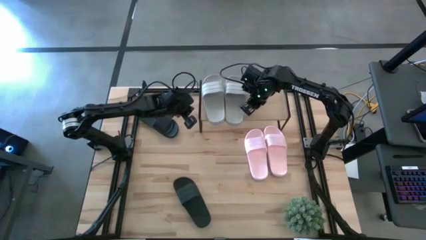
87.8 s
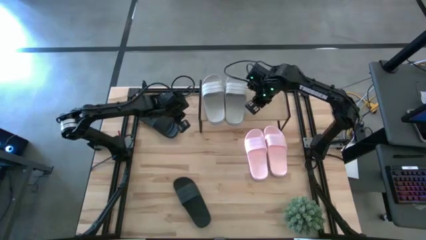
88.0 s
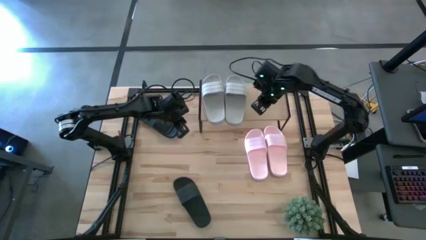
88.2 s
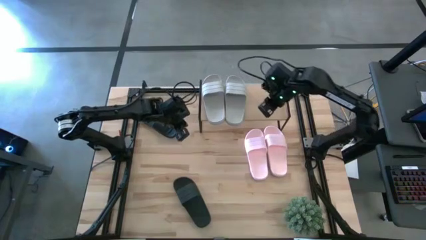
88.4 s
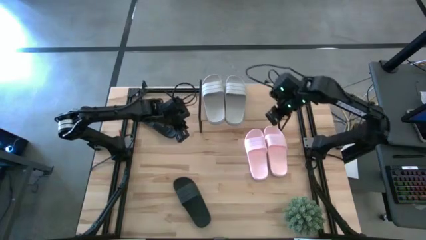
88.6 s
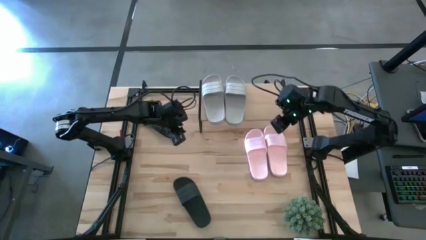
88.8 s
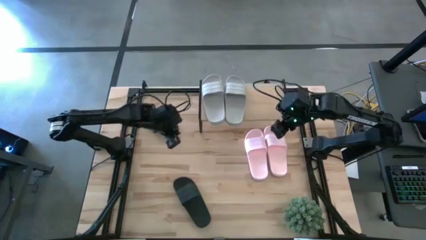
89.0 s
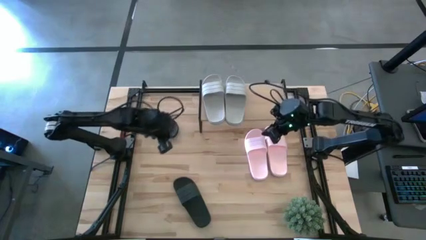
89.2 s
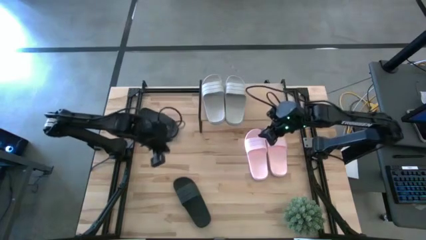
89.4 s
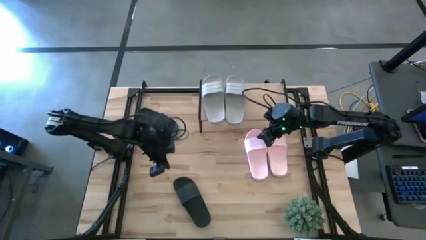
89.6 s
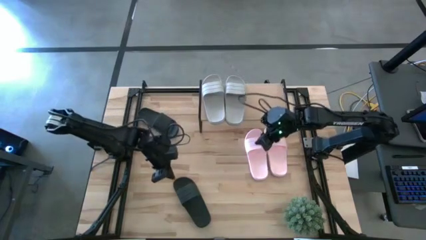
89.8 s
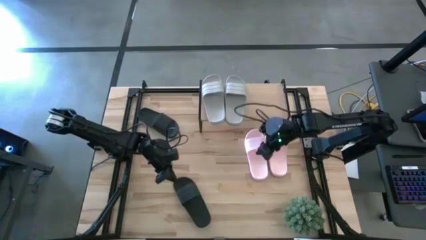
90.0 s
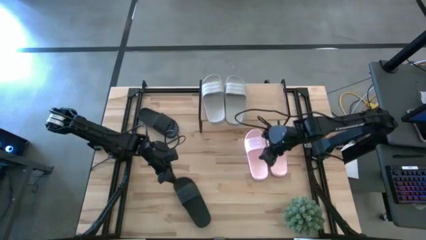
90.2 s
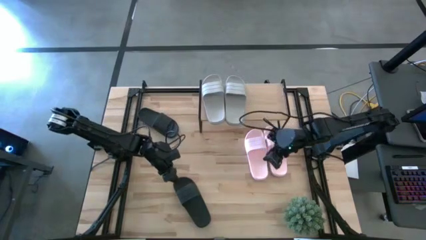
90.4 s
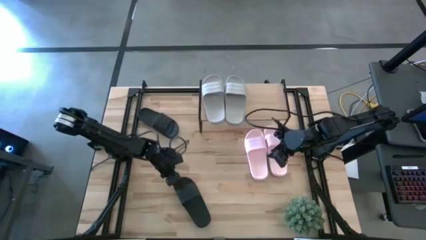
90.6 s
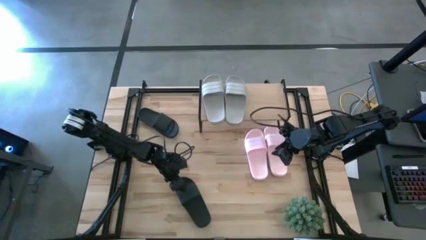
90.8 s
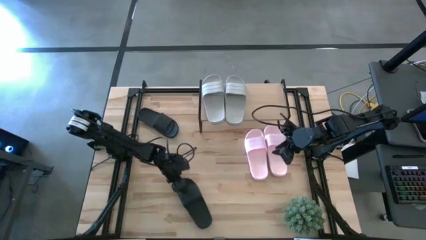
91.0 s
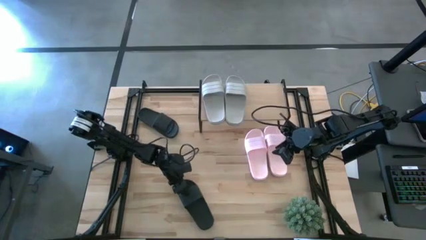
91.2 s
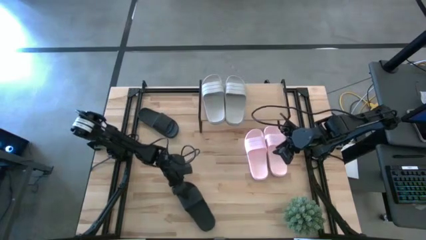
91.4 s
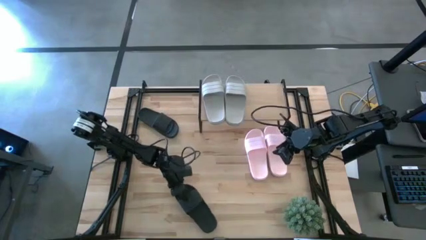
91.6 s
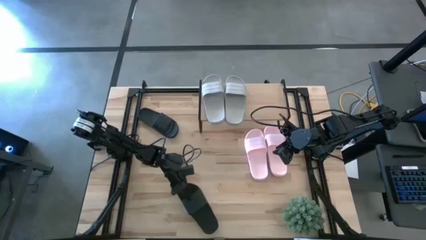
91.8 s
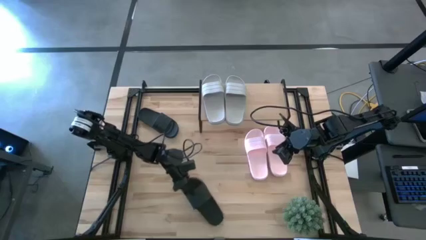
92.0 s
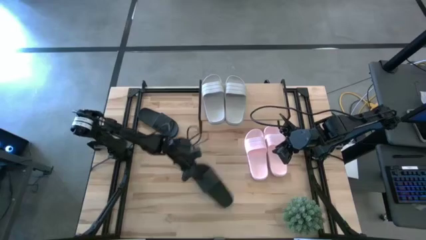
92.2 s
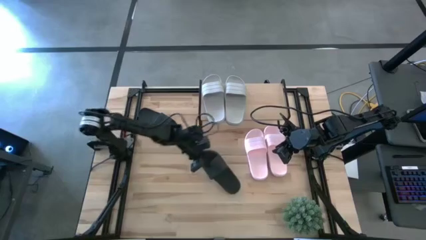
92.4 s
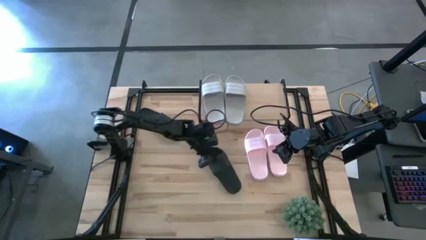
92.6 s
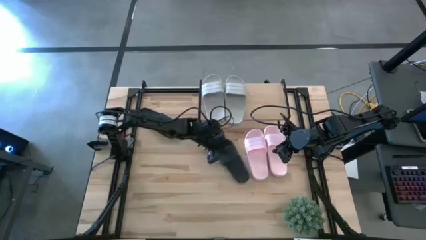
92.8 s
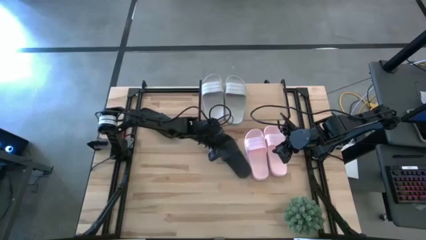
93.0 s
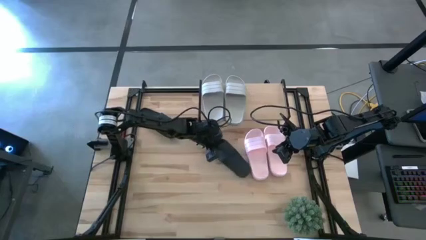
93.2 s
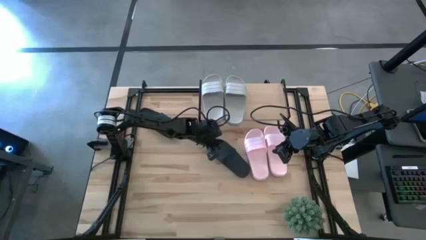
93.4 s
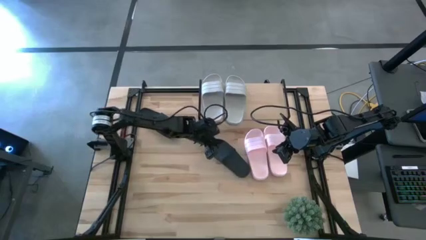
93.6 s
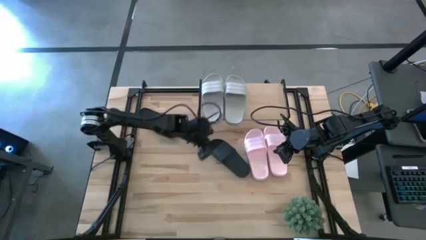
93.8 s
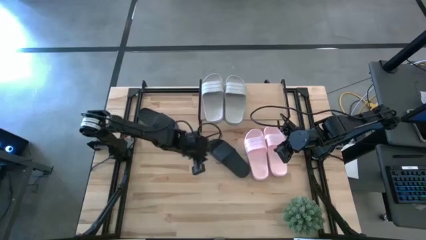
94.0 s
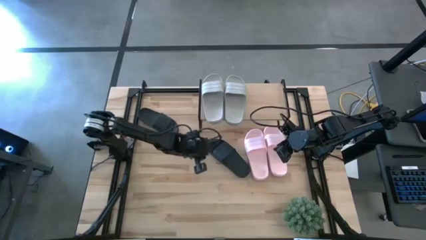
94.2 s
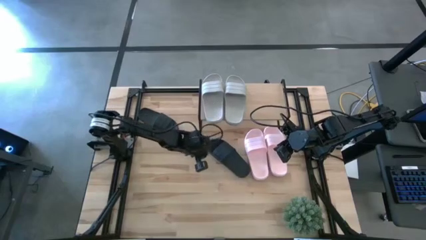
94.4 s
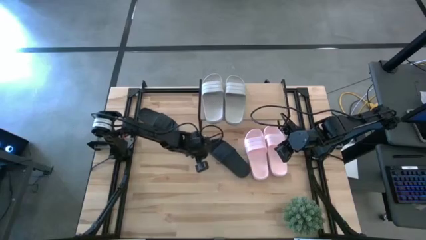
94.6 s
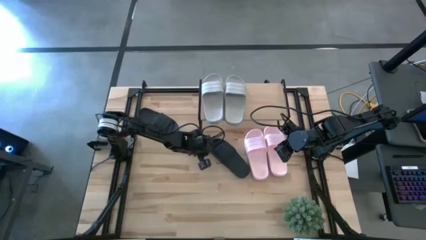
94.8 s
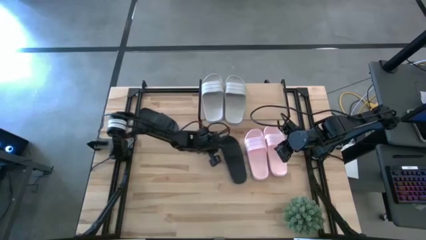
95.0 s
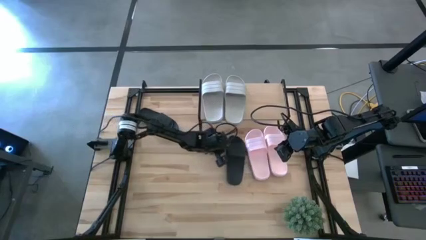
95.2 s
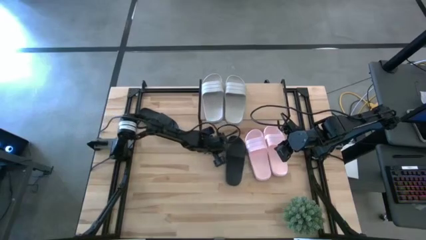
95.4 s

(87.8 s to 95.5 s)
Task: Pick and place slides into the shelf
Move the bottom black slide to the center of the table

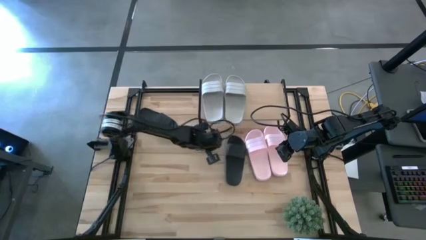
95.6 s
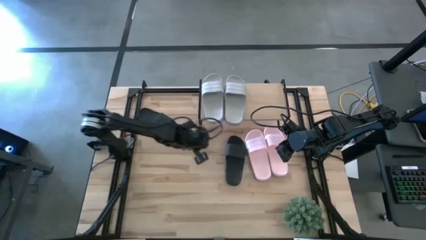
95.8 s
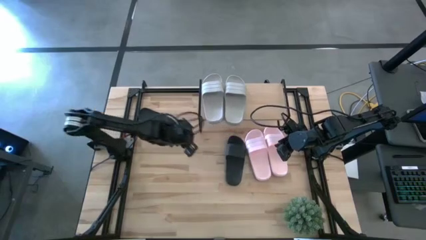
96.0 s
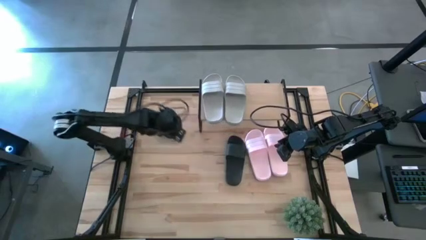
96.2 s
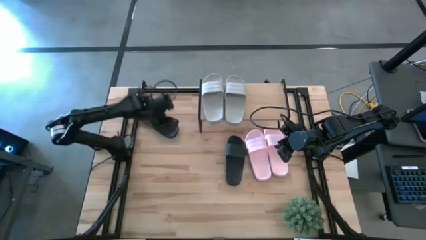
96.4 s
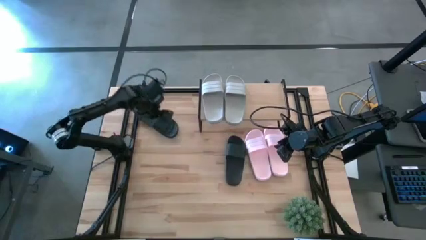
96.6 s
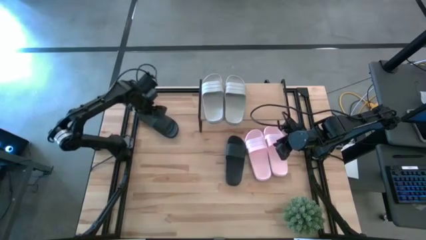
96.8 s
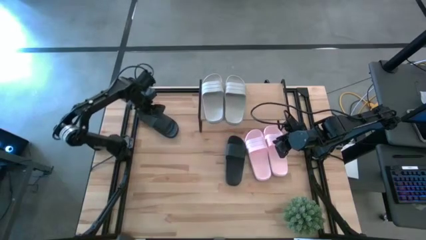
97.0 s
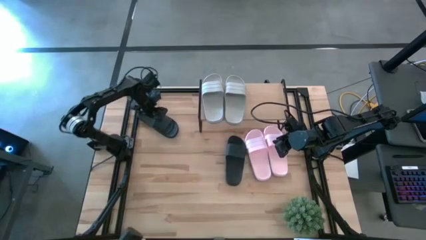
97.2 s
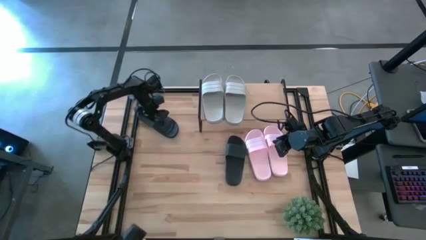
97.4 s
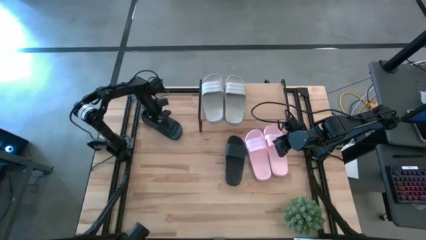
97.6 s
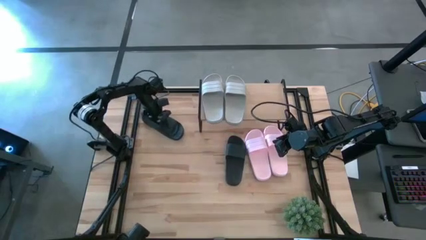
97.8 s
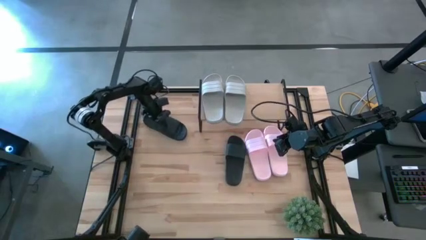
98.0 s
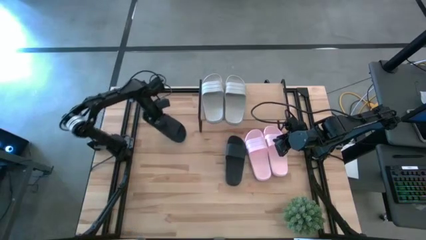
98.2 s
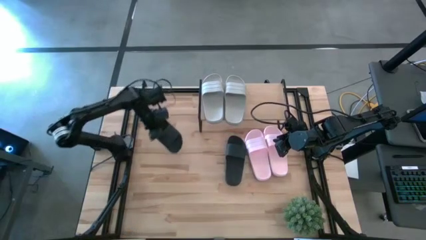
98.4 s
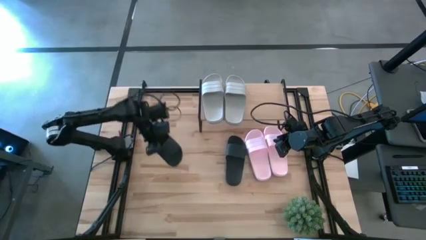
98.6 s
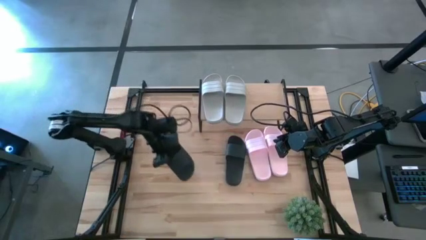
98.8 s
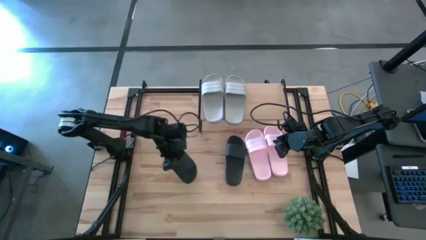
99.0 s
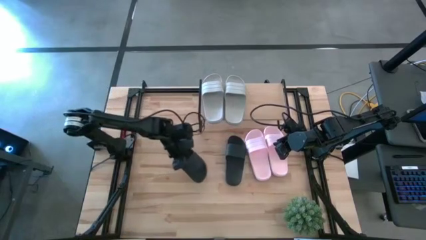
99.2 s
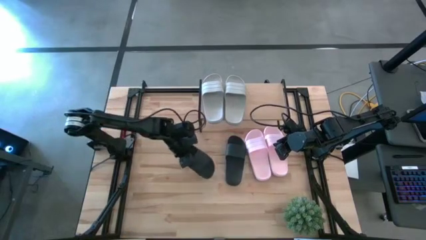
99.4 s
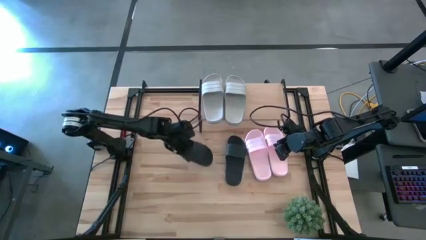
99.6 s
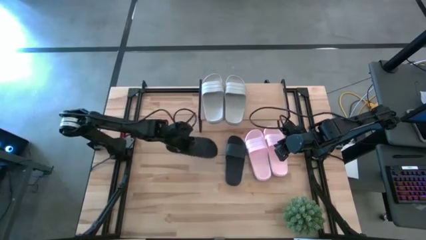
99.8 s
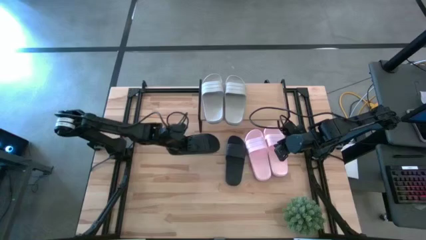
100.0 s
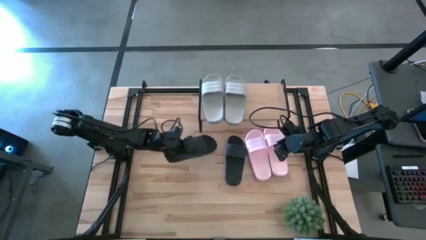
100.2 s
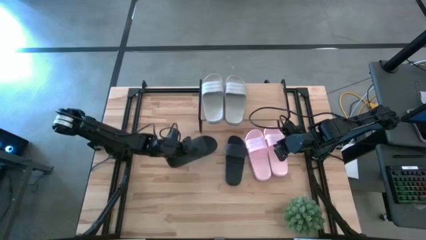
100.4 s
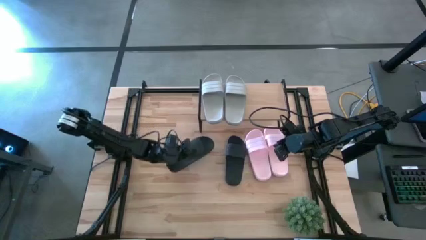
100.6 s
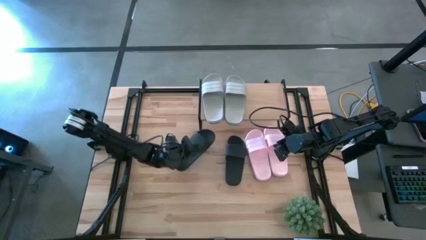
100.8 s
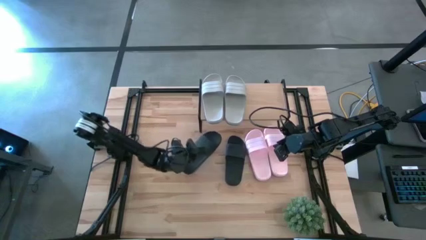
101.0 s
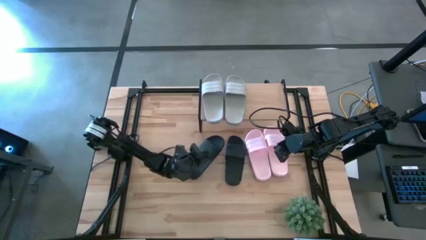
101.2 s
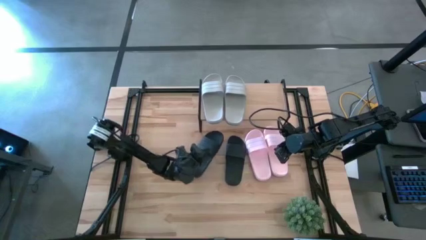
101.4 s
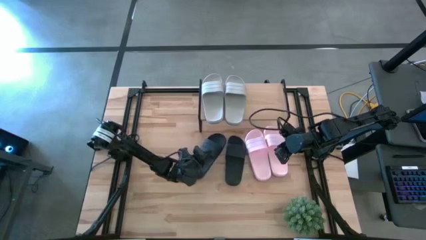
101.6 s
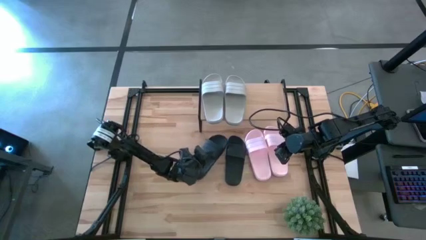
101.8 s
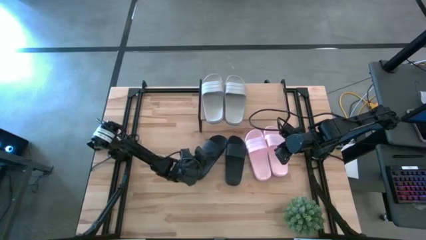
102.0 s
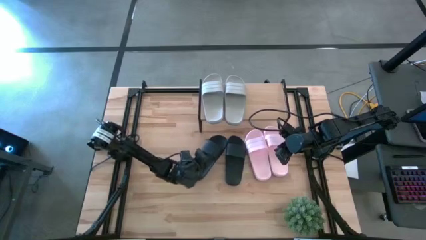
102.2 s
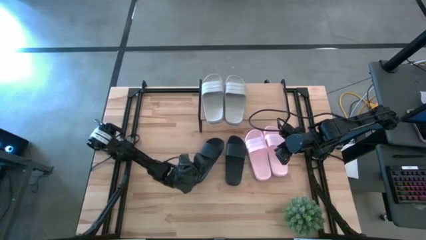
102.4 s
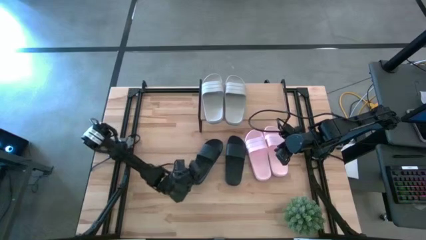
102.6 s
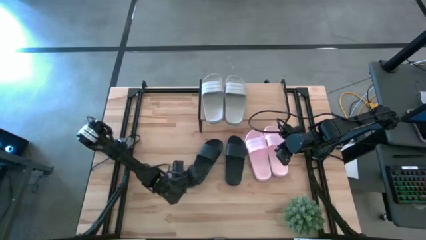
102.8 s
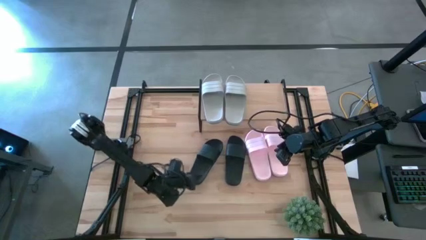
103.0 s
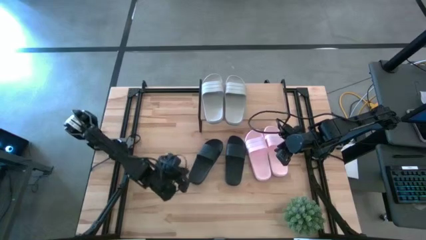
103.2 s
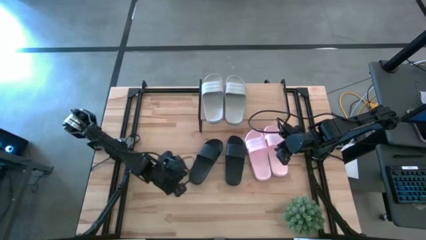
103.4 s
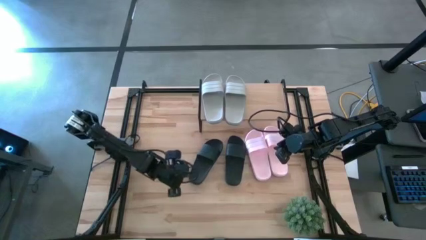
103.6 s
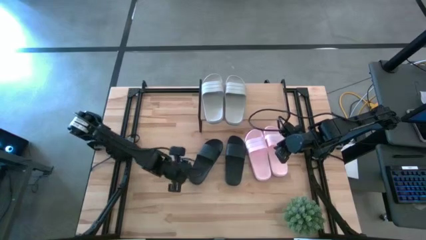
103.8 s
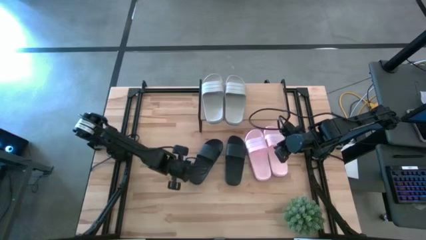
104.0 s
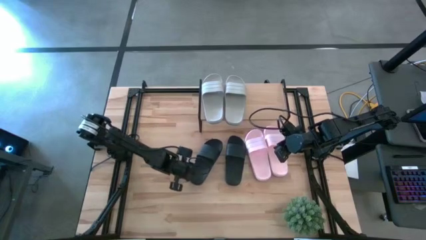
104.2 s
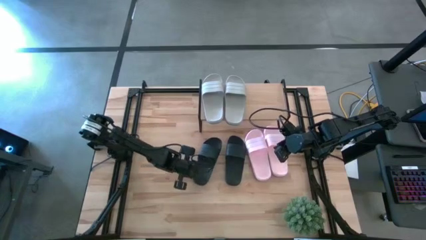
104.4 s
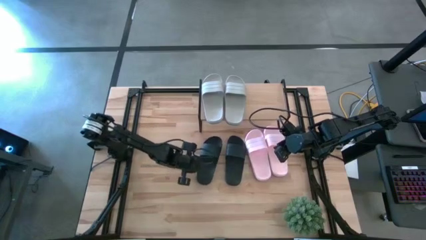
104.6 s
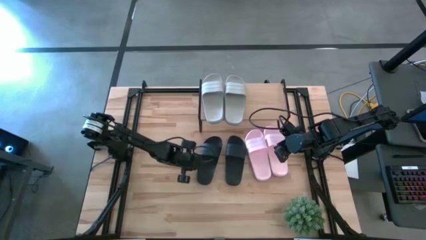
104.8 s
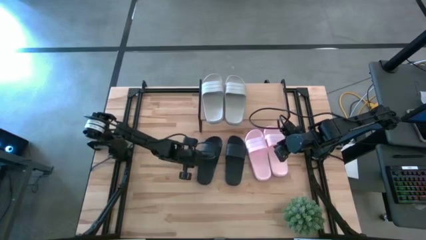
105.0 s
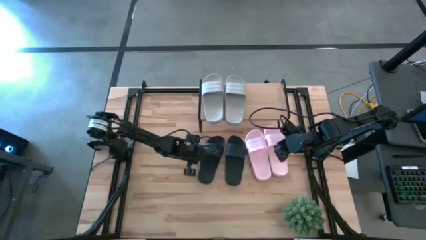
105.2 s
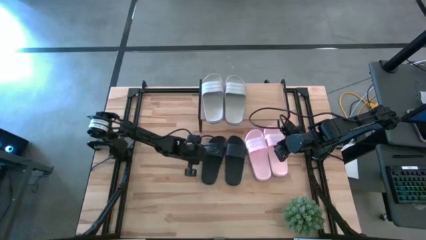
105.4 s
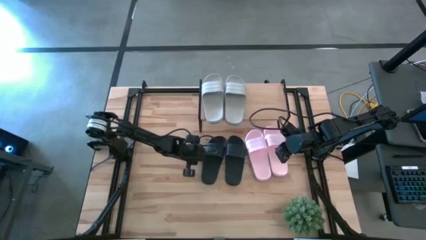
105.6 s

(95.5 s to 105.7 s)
Move the top black slide to the center of the table
